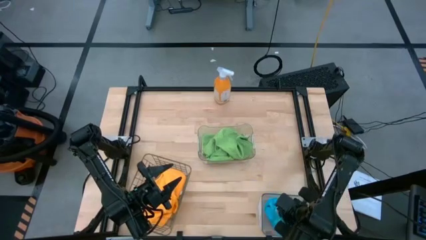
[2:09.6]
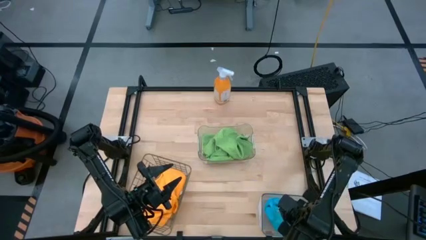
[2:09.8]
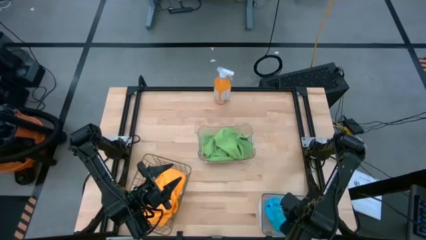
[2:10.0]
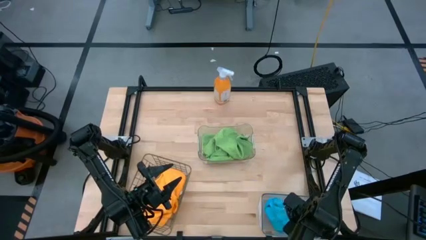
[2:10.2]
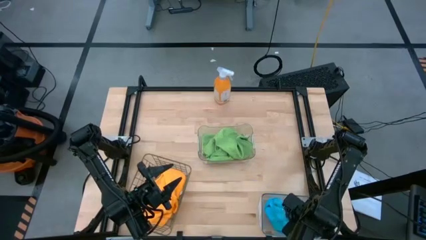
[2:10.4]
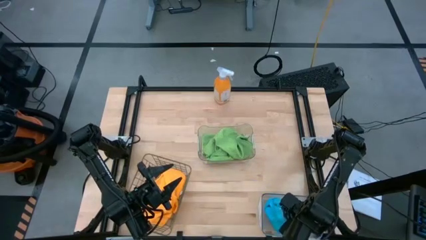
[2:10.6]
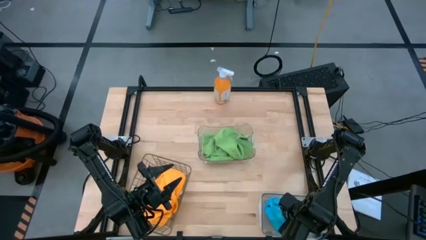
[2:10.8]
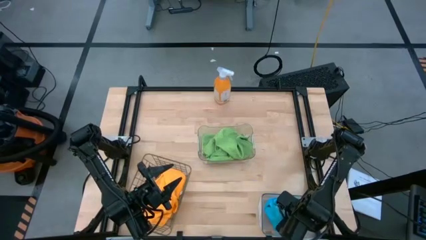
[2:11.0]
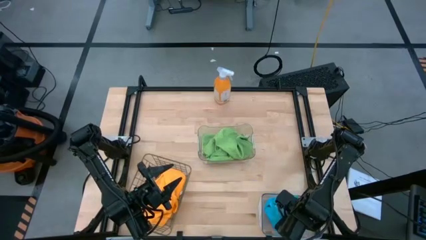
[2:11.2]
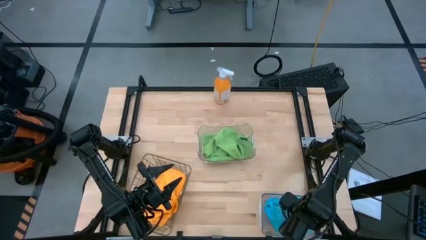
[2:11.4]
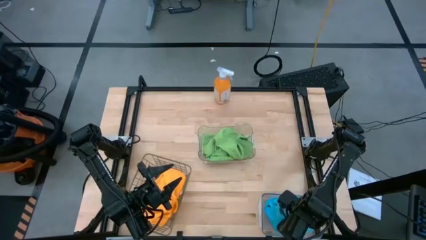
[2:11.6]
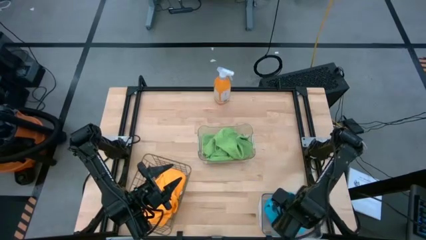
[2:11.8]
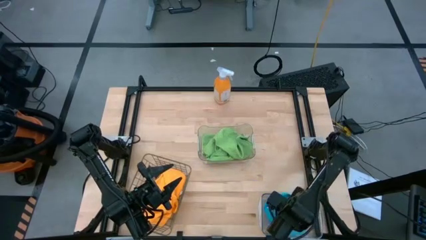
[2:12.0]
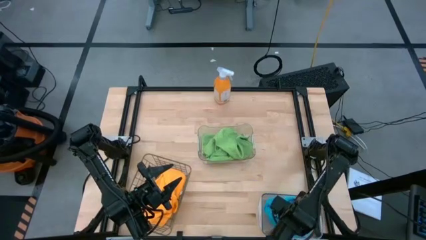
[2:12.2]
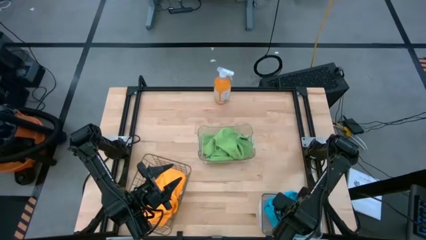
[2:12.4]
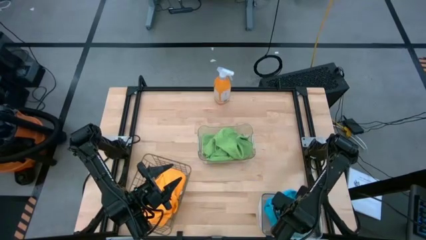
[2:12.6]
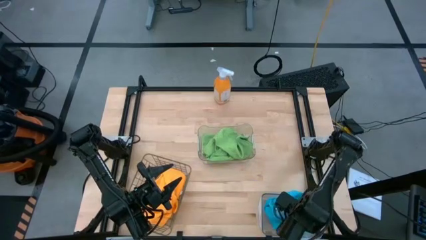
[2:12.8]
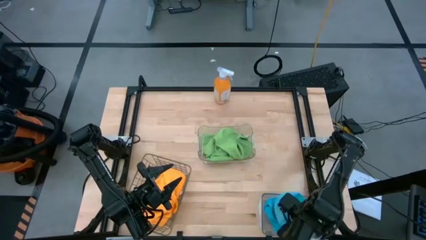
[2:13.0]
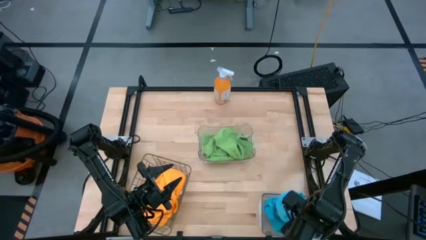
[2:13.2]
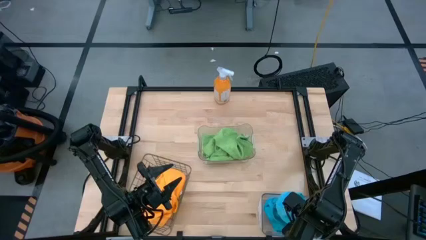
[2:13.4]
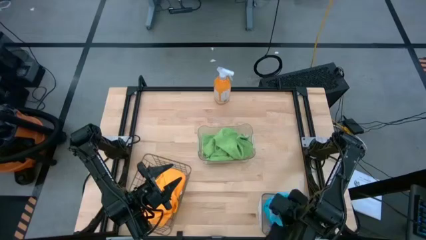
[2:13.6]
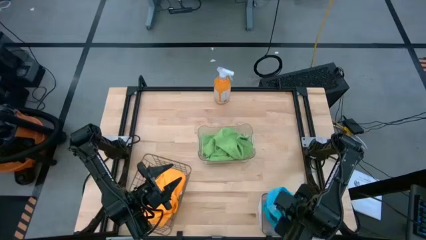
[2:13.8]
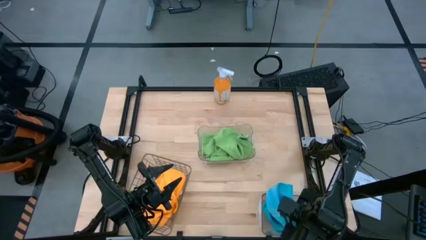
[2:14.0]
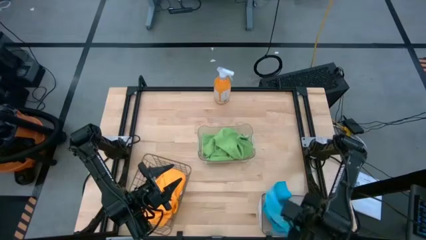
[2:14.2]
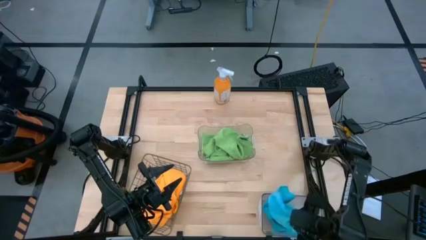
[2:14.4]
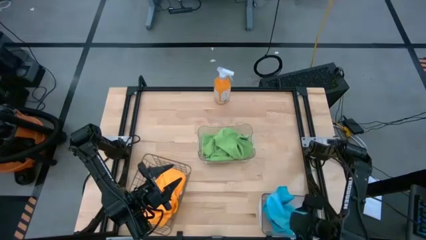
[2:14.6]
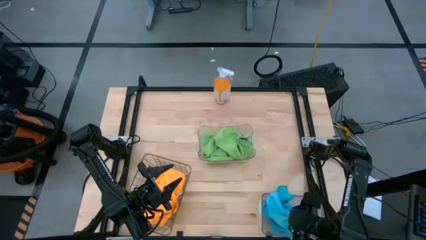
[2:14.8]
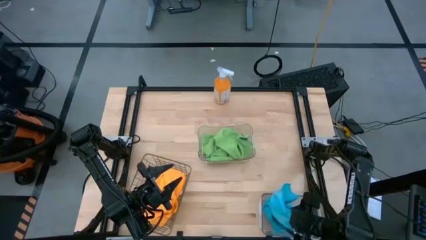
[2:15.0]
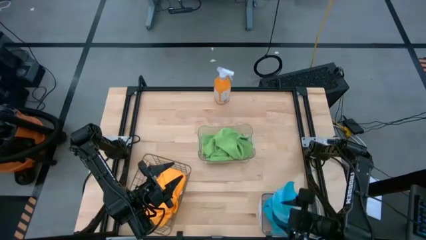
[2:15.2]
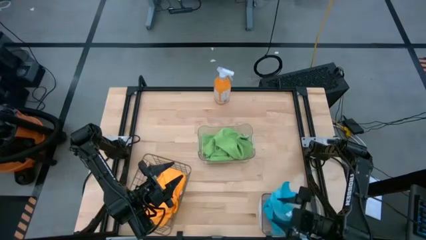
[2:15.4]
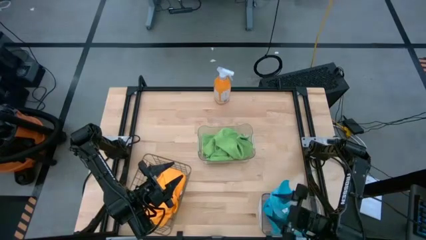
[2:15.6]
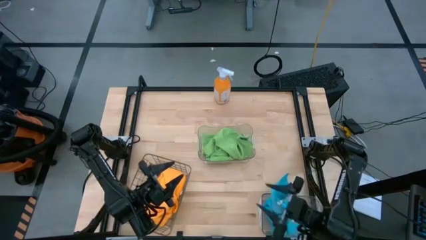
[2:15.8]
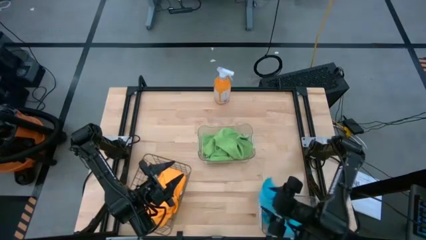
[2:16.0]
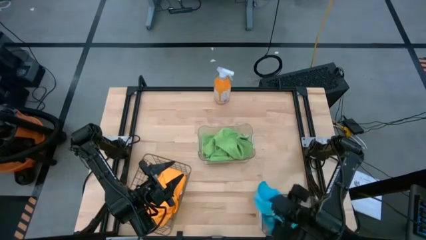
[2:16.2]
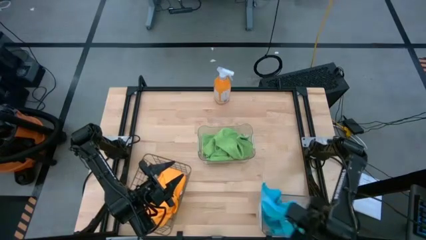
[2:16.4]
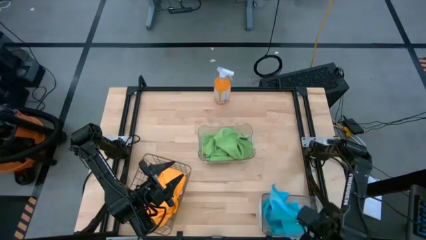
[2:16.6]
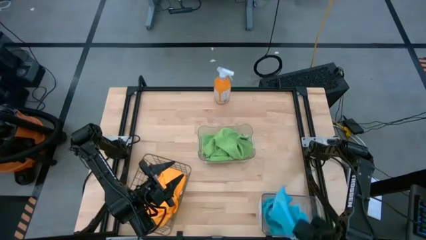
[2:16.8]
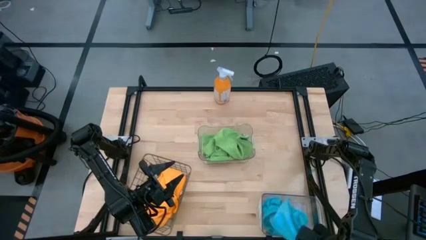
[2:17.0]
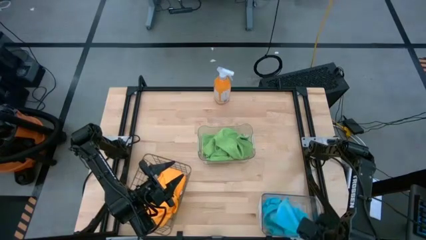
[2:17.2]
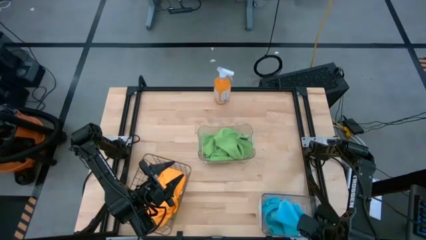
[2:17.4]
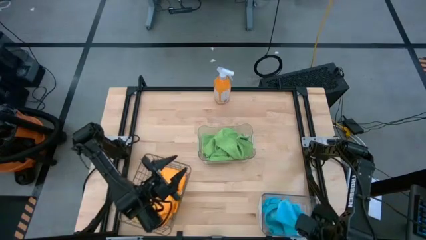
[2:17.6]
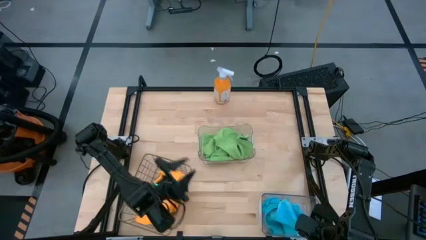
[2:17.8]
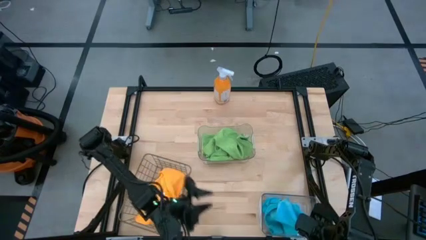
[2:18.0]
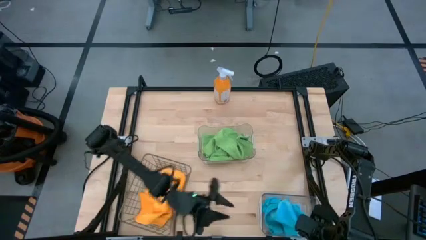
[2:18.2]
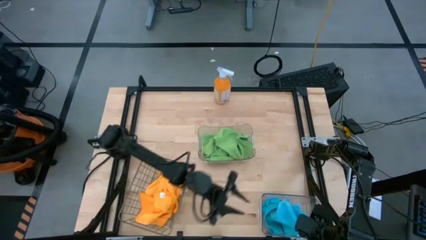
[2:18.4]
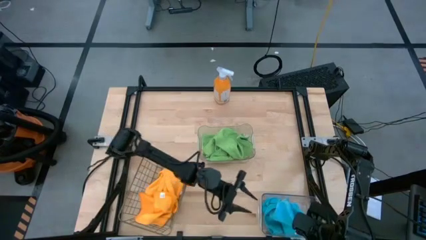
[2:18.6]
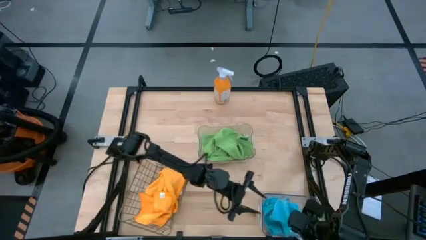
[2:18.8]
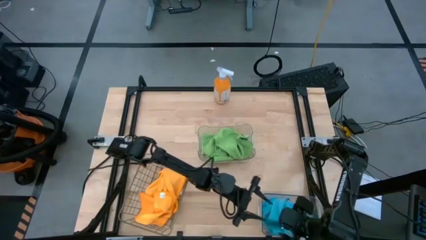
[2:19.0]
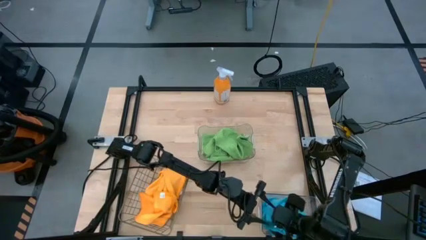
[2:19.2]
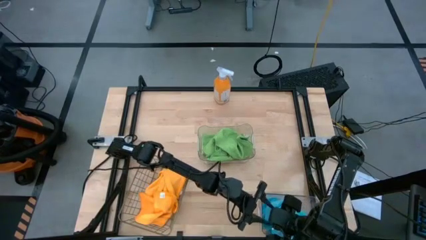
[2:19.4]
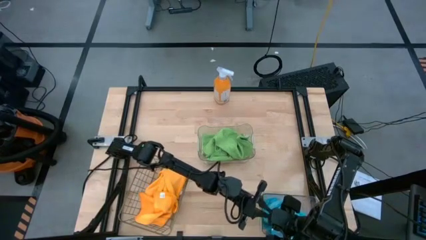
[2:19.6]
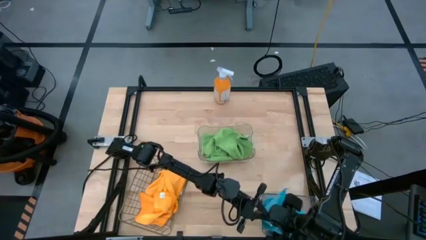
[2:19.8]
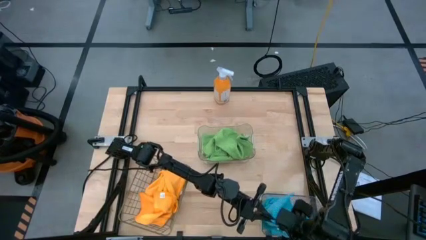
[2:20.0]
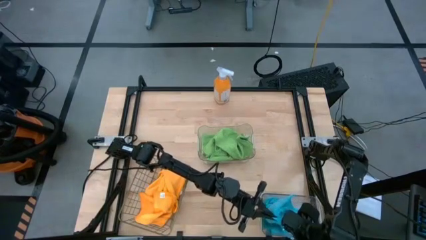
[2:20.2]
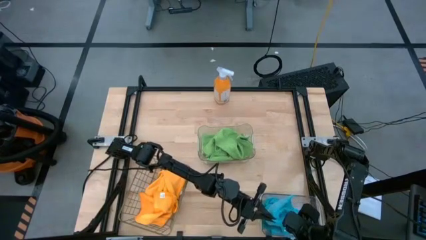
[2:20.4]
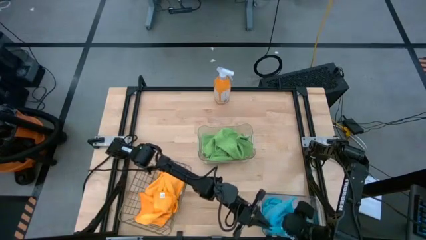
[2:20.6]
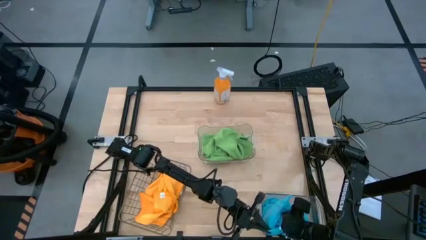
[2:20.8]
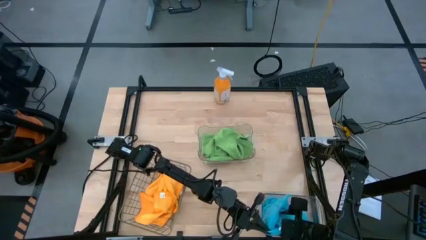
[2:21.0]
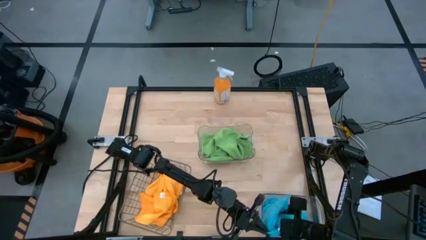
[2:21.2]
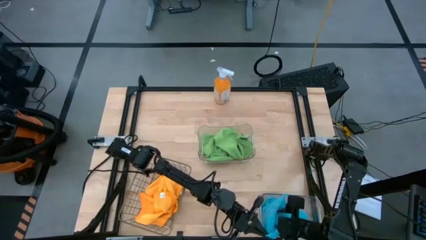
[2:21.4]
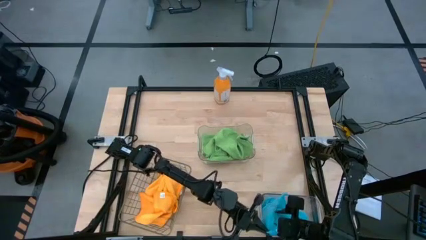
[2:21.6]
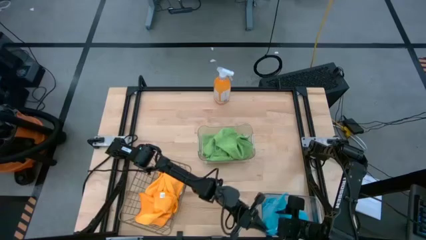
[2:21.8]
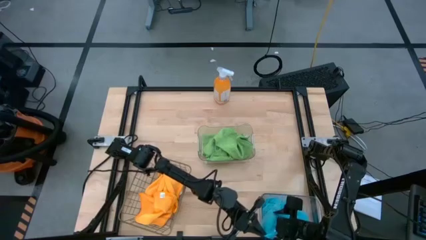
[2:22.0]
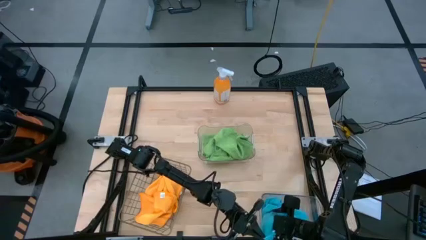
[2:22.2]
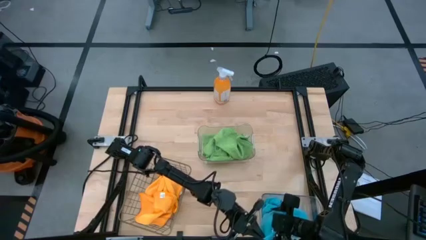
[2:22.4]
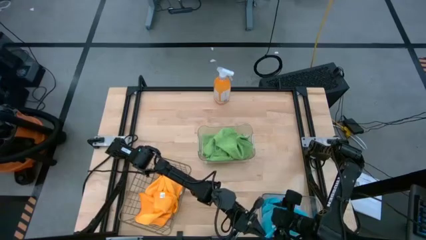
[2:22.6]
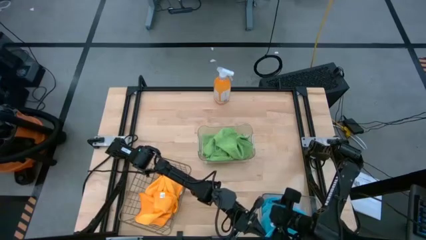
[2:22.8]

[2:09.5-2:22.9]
Task: Sort microfiber towel by color & place in baskets
Put the blue towel into the bottom transparent bin

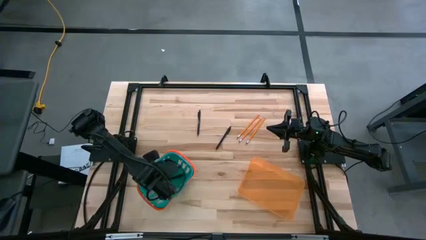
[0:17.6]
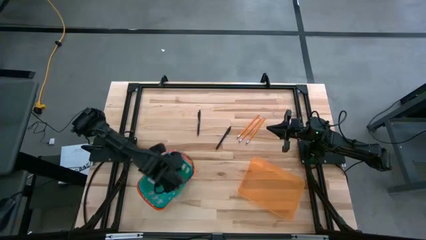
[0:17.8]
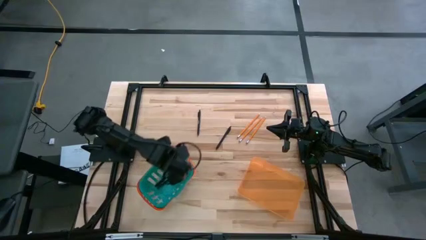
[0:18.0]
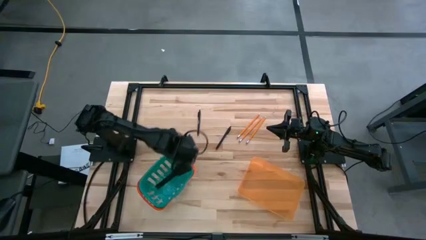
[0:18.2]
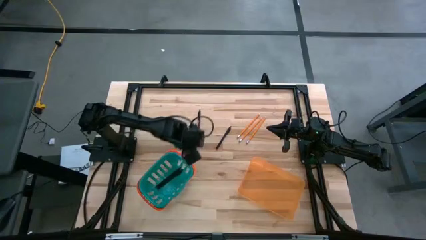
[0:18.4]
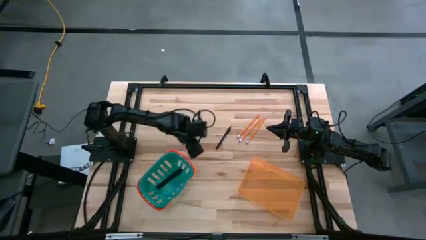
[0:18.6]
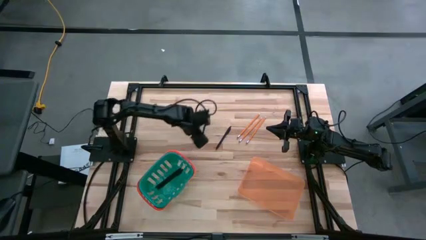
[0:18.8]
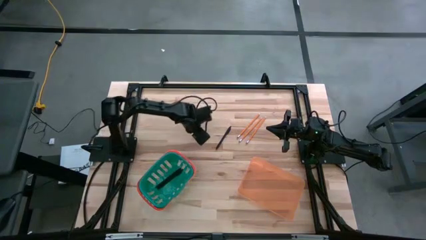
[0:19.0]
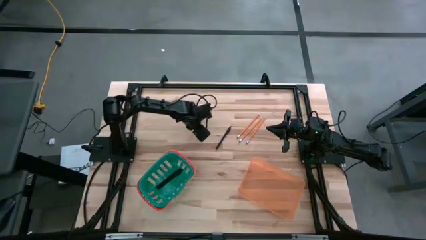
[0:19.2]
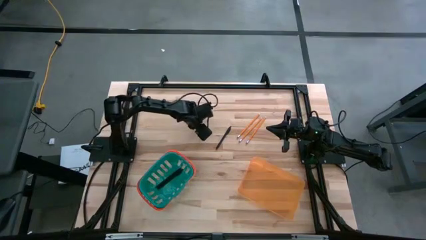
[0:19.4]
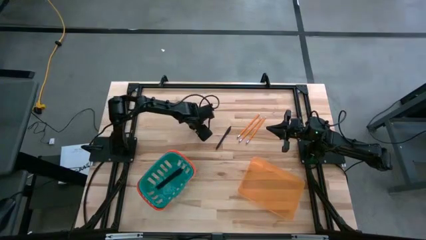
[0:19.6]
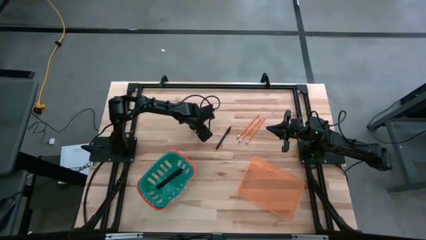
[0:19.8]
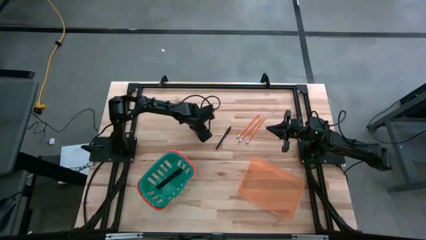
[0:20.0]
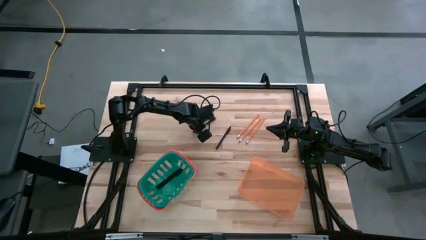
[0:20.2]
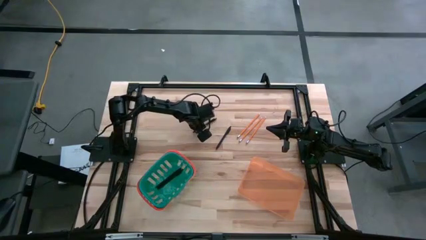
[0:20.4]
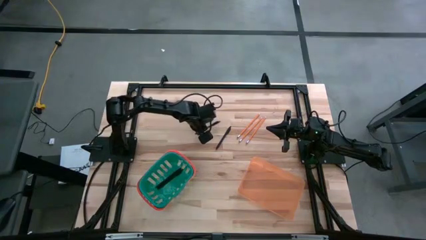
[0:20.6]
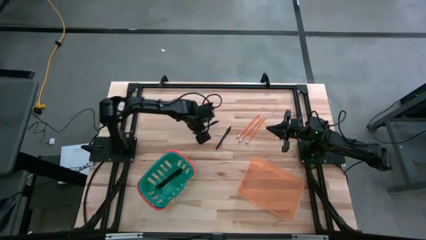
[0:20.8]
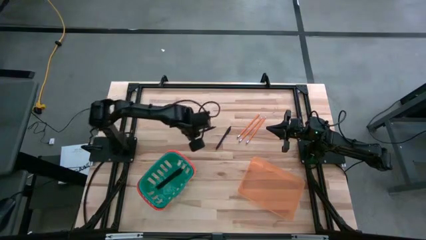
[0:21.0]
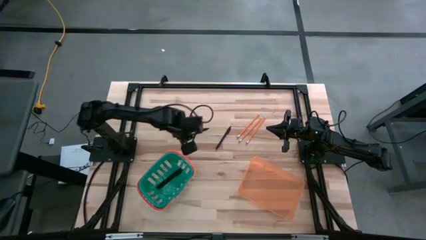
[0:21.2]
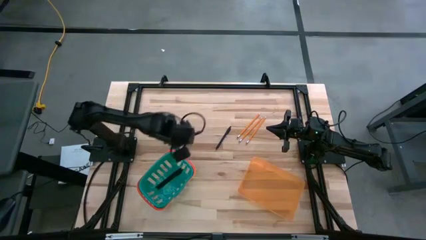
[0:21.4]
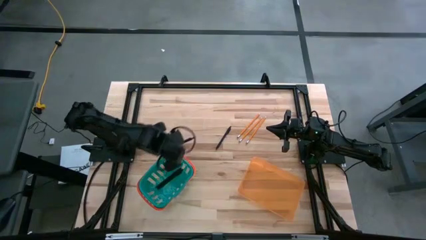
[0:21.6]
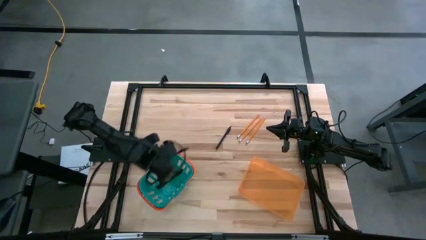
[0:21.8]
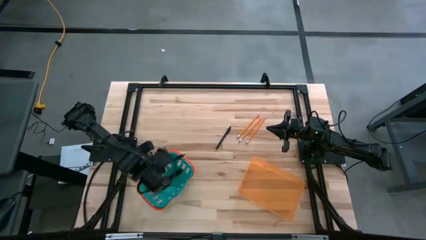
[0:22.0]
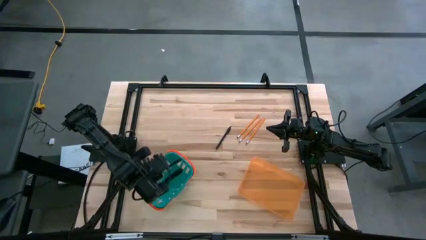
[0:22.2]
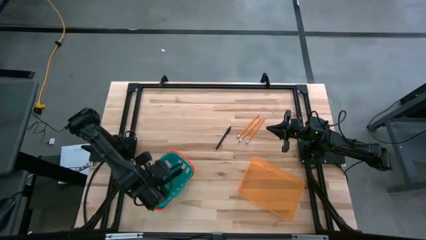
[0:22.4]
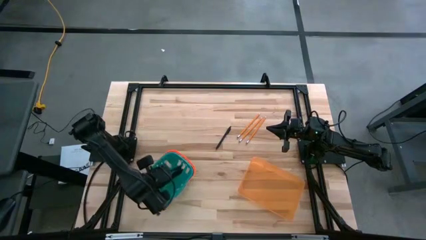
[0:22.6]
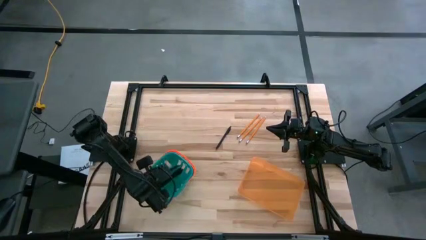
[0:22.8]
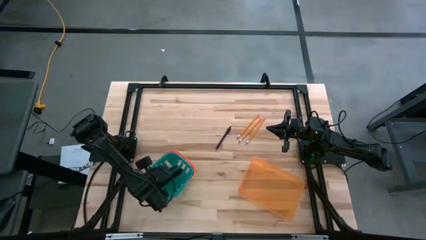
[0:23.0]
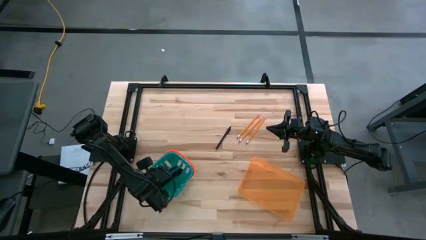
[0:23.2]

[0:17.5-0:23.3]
Task: Sort pens & pencils
Put the top black ballpen into the blue bin
